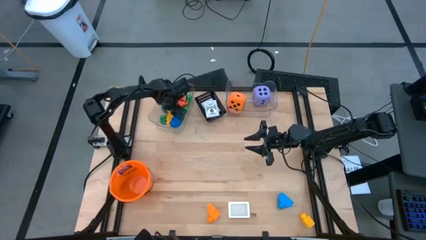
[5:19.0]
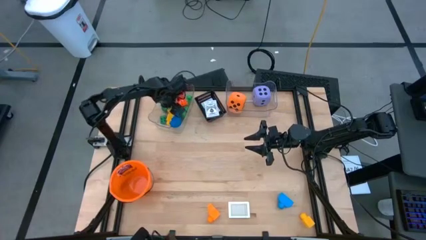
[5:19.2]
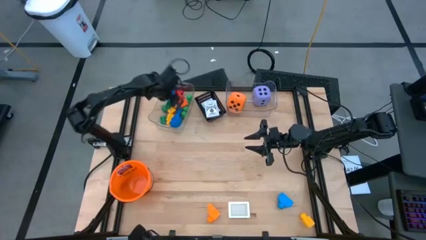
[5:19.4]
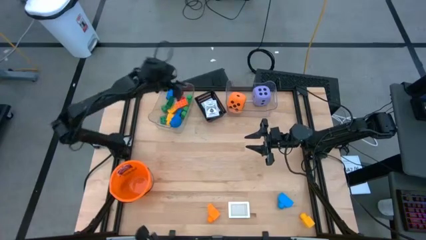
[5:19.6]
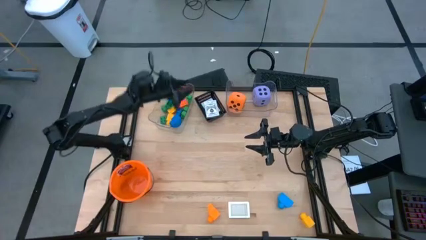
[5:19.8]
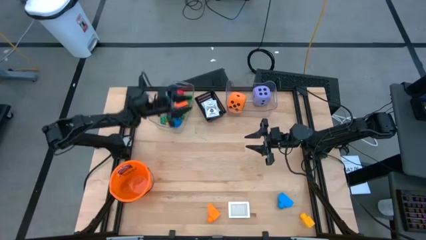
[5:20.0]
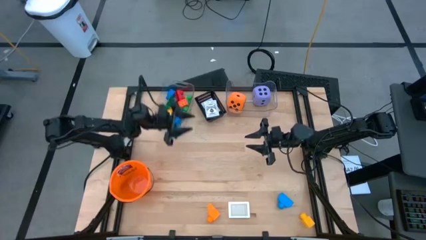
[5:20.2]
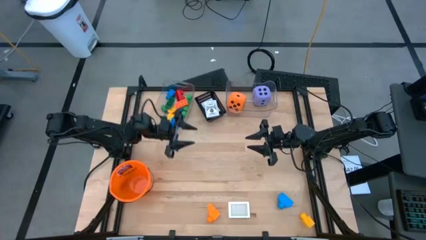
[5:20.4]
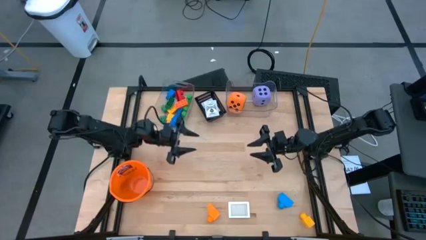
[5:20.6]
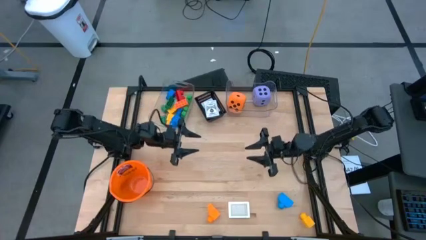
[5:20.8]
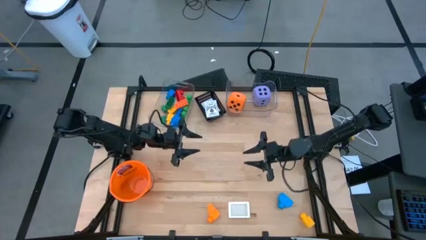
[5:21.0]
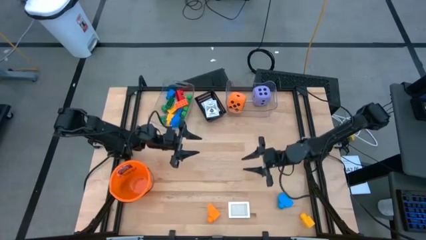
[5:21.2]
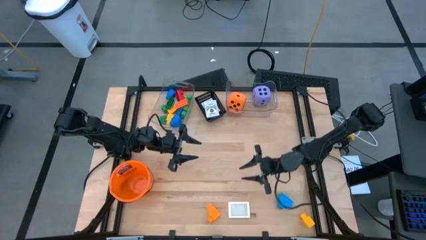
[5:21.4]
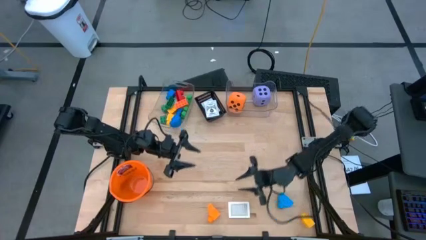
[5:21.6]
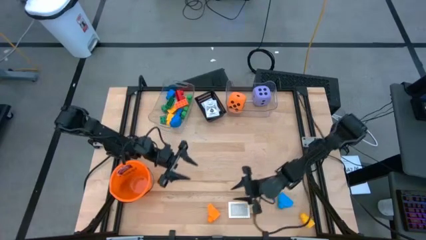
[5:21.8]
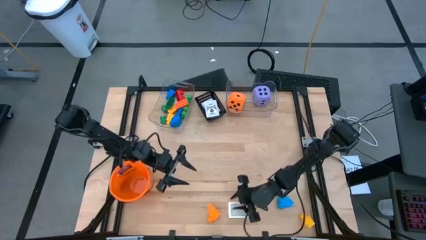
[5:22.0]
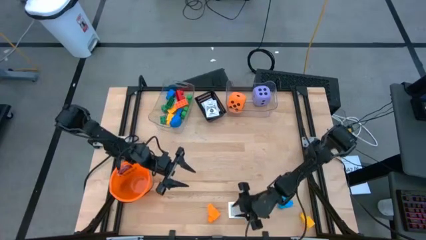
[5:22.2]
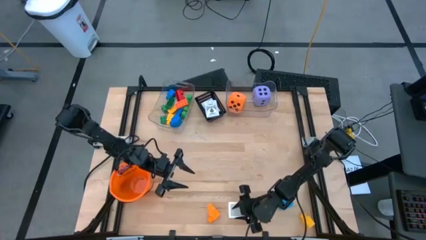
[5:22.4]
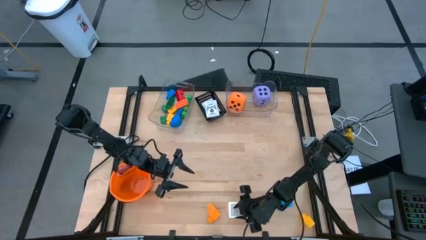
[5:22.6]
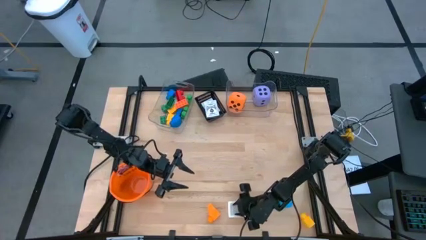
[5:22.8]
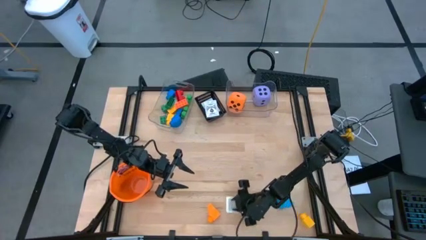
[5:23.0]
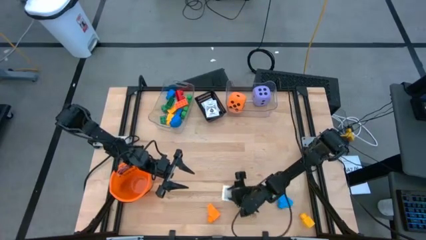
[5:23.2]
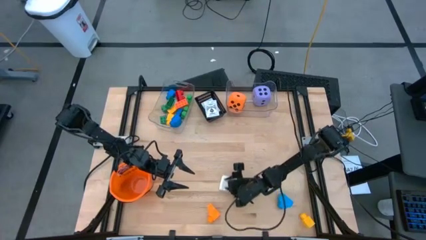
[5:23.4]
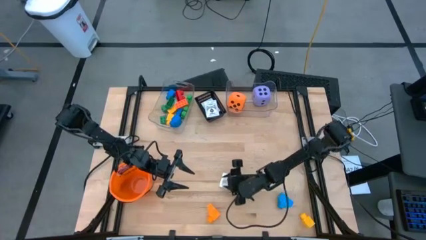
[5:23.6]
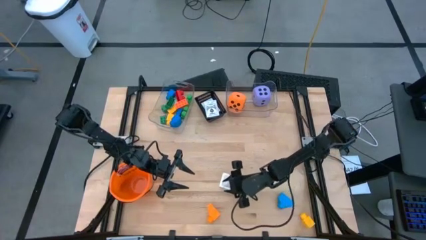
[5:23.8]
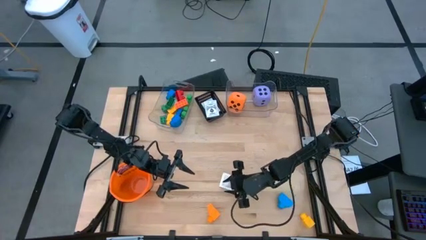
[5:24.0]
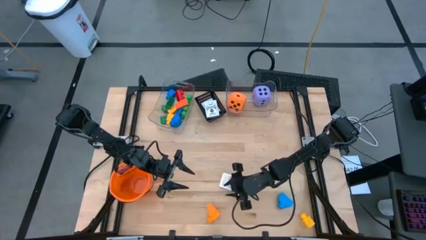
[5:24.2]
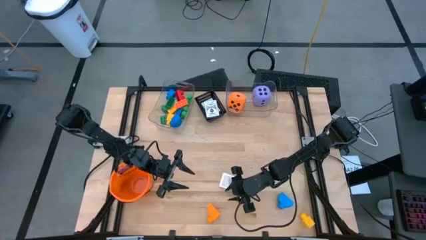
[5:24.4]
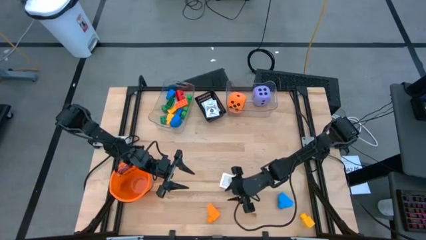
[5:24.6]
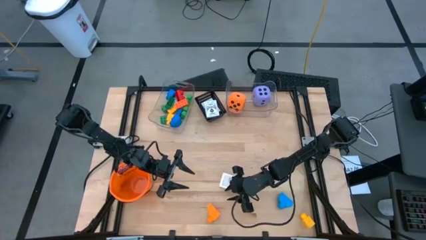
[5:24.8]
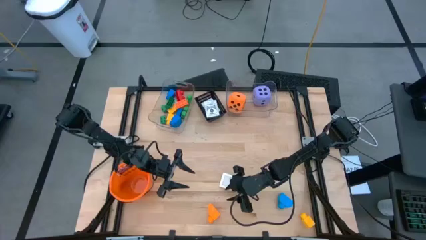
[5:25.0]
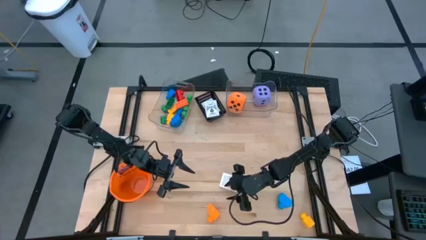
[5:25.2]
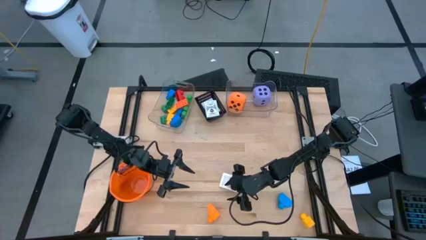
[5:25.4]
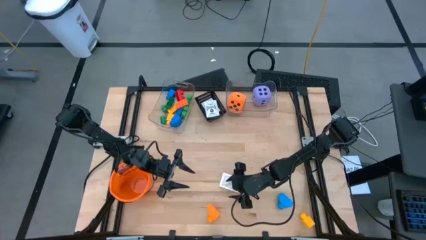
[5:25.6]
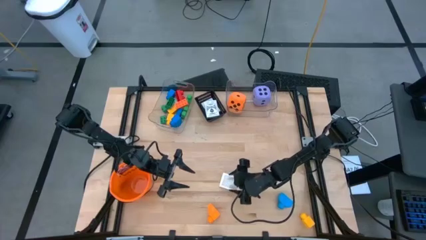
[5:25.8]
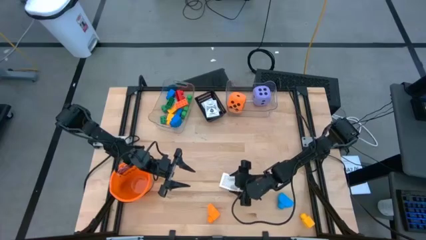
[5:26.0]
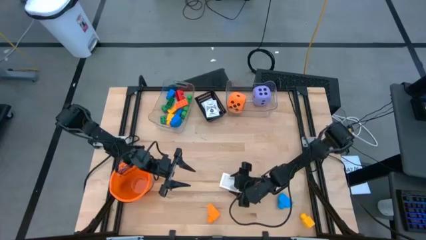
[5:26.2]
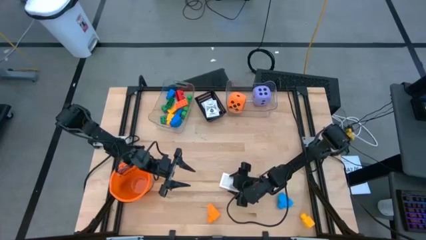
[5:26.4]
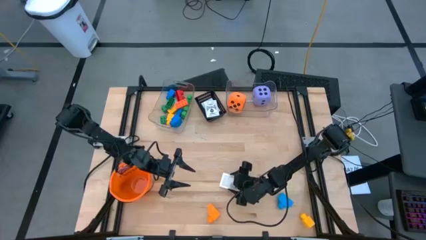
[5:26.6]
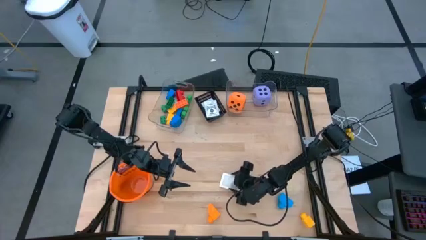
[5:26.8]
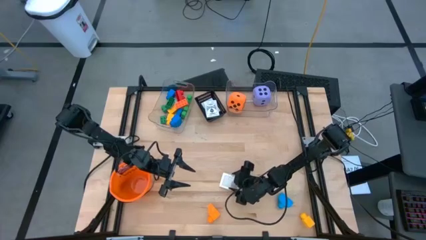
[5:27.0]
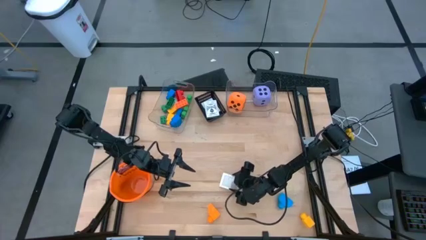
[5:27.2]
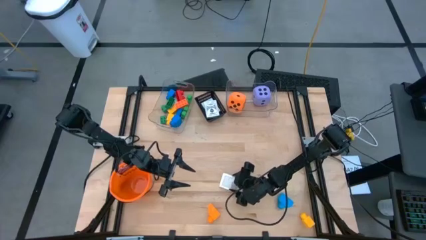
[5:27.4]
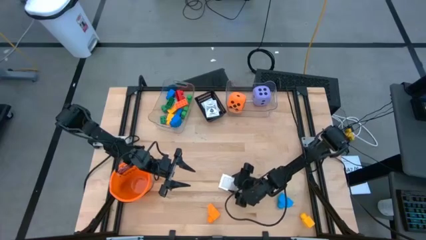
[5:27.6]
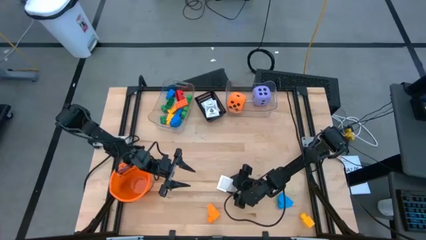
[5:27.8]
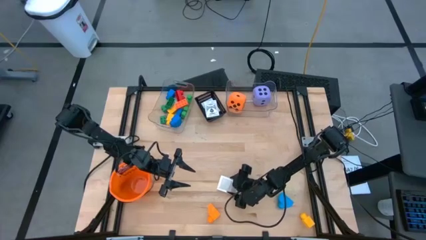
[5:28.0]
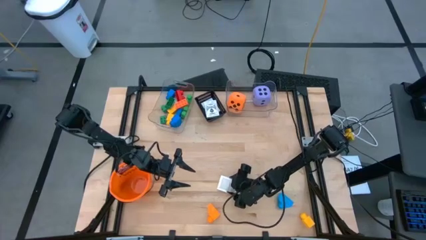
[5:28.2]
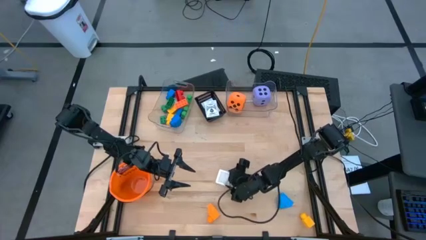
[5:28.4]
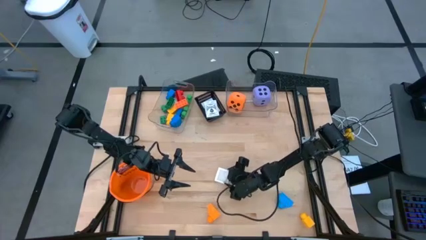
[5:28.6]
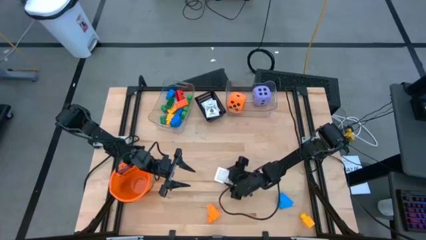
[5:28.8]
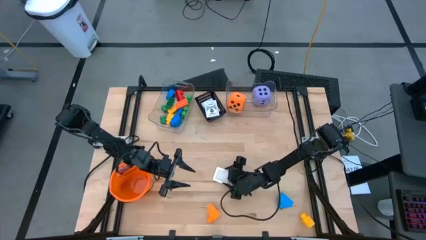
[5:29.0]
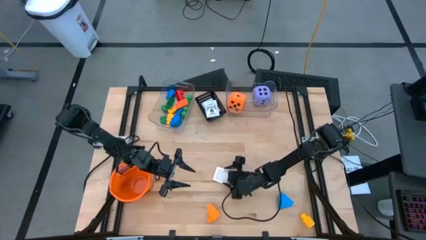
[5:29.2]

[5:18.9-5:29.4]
Task: Pick & Place Toys
Put the yellow deck of cards into the black basket

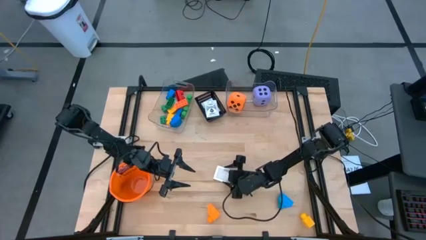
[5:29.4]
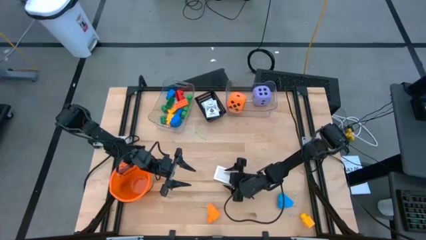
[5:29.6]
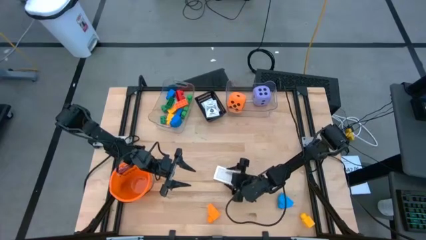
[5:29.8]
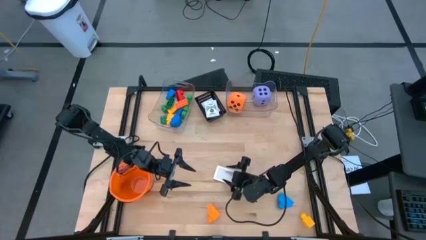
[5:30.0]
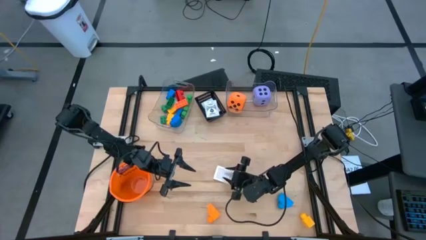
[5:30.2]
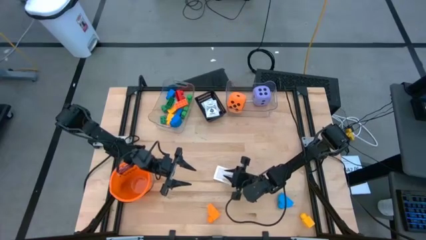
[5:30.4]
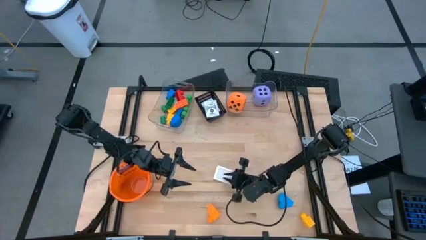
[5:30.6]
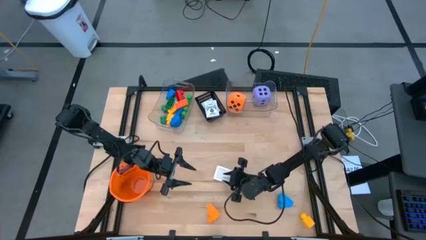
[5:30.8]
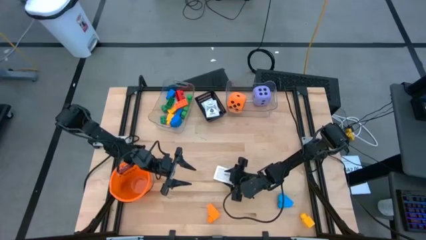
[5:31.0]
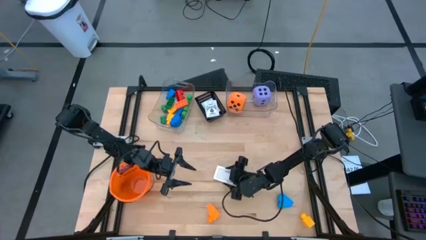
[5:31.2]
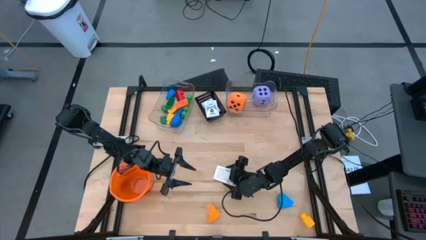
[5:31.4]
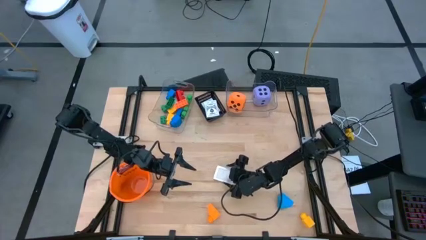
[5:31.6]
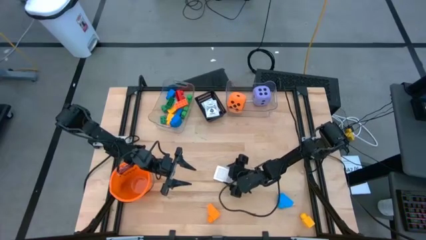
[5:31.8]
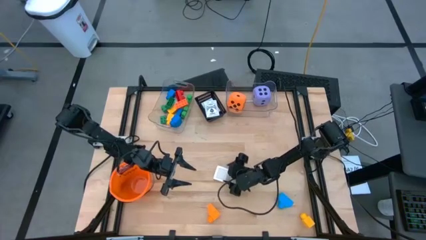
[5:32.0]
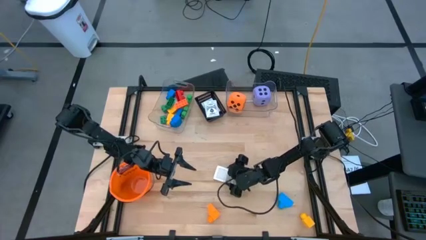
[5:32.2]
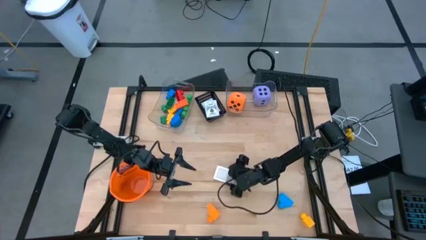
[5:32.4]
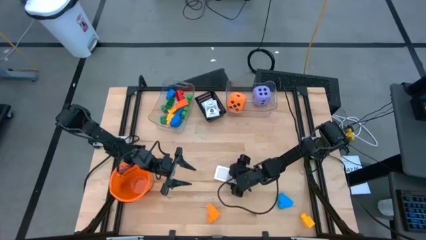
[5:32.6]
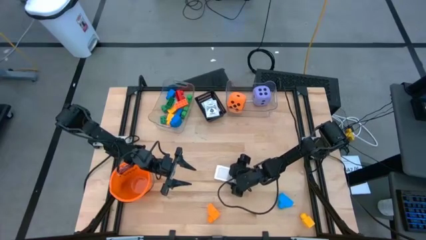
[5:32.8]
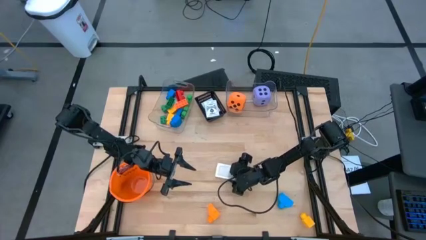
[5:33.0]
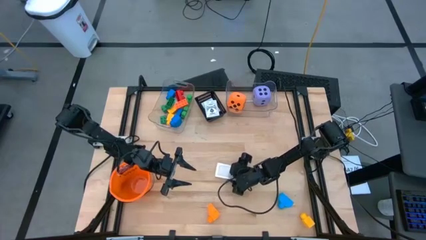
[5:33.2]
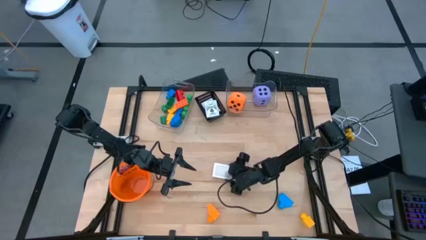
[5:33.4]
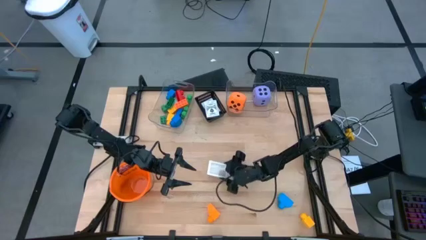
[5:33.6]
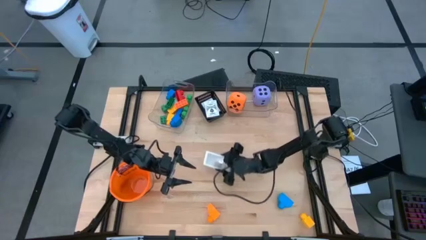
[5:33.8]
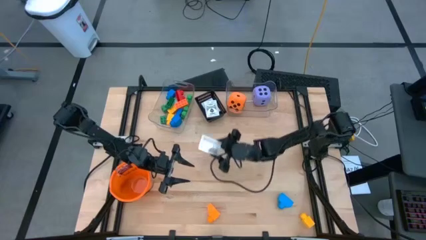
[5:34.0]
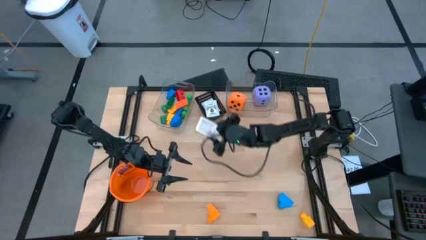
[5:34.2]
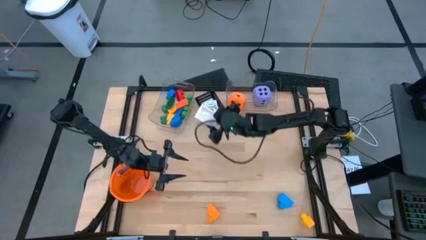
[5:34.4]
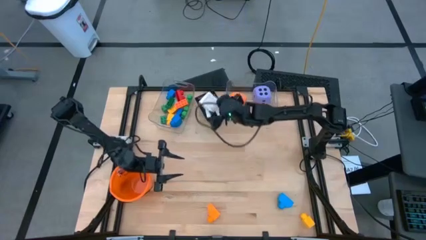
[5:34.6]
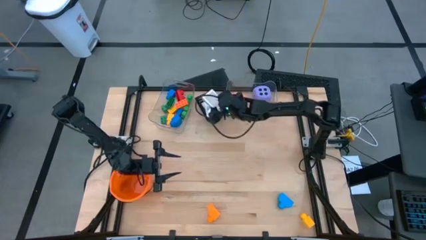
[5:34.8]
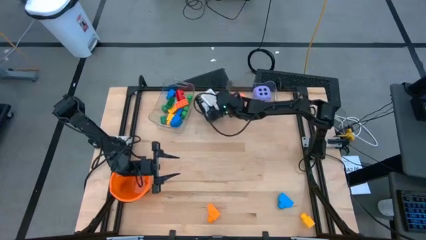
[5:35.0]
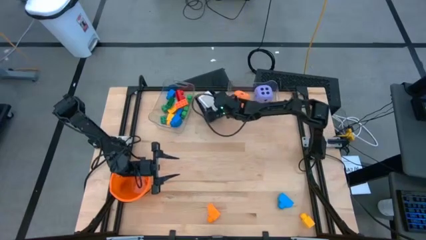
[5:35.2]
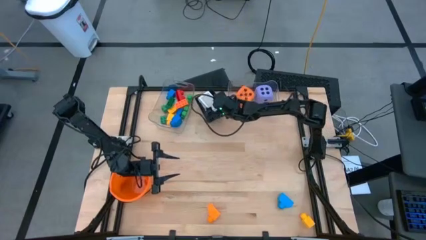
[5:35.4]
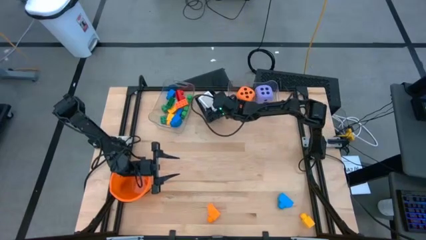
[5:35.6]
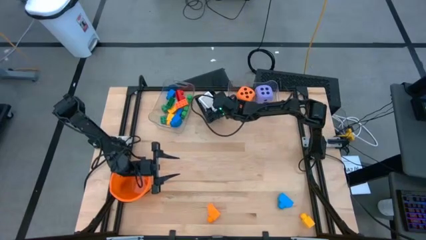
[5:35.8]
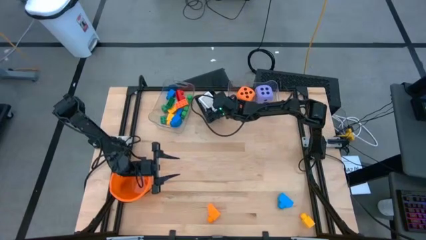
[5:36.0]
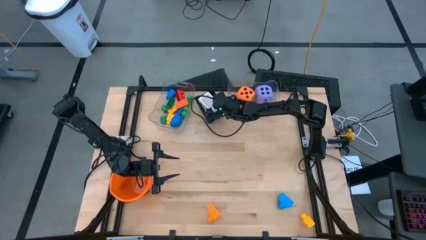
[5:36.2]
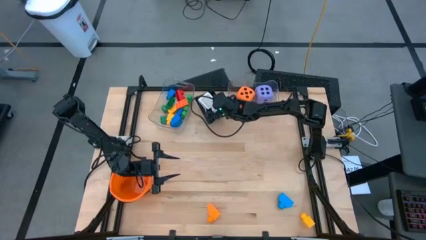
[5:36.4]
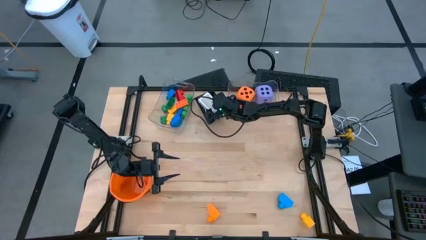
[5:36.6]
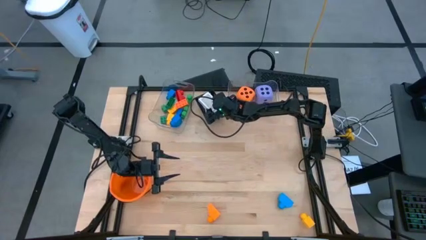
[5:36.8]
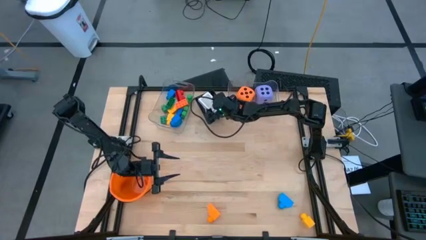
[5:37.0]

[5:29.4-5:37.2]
Put the yellow deck of cards into the black basket
